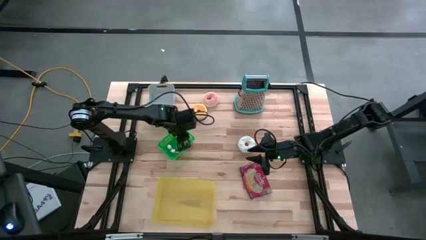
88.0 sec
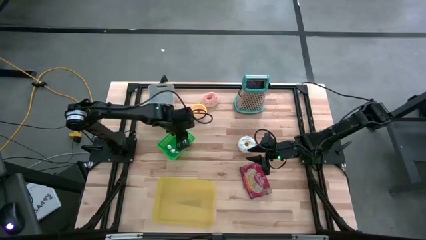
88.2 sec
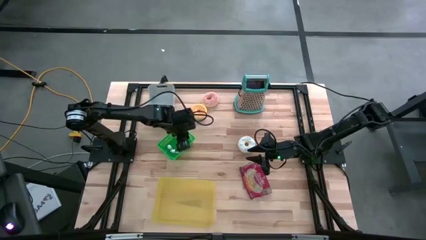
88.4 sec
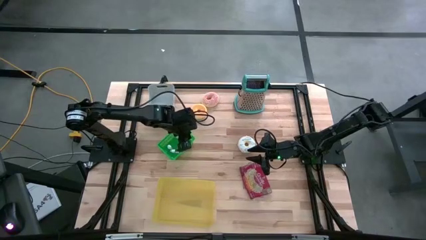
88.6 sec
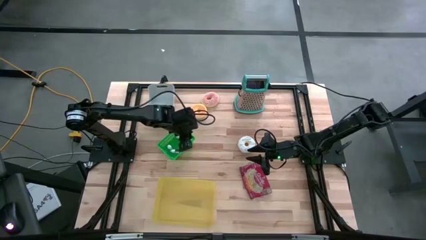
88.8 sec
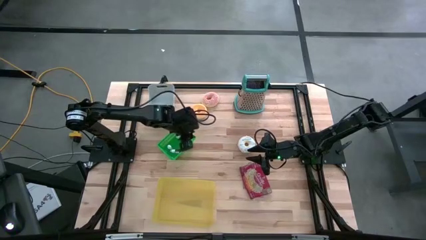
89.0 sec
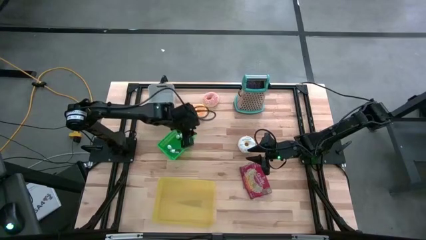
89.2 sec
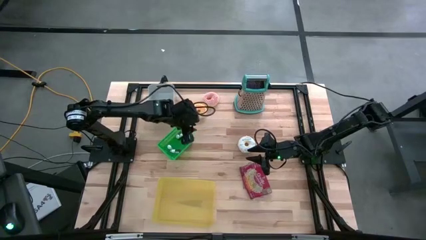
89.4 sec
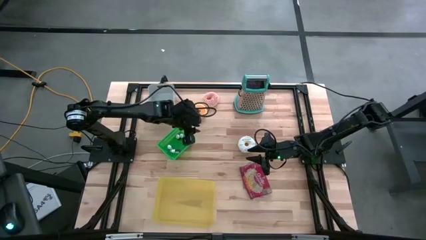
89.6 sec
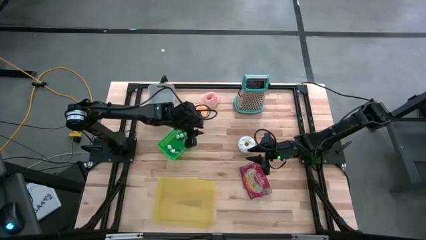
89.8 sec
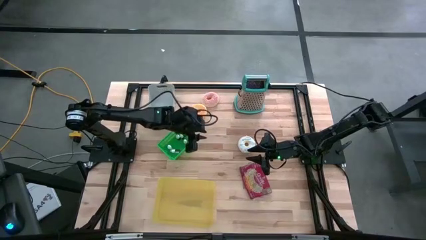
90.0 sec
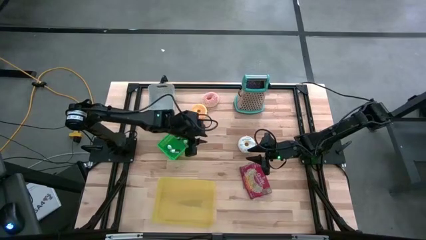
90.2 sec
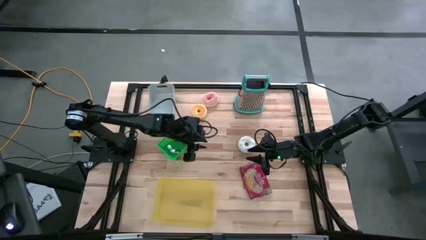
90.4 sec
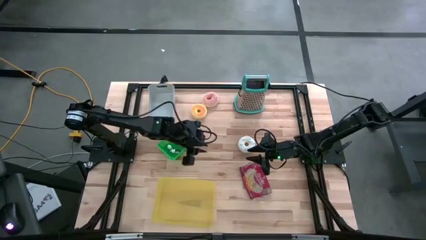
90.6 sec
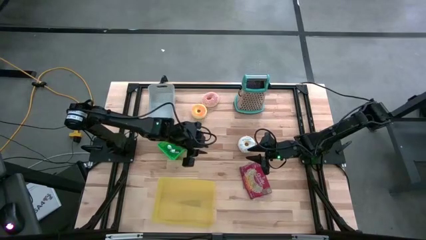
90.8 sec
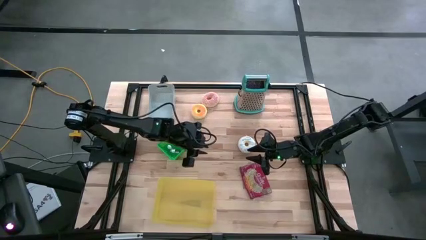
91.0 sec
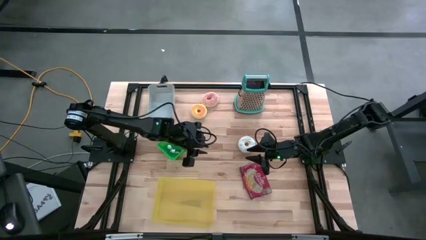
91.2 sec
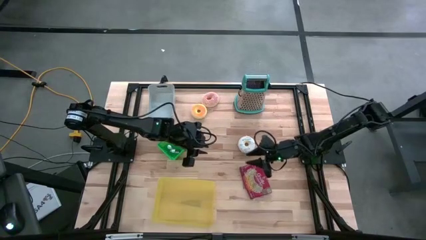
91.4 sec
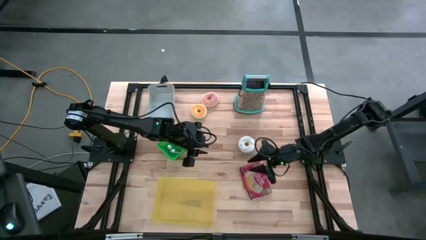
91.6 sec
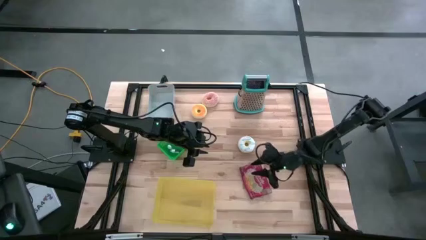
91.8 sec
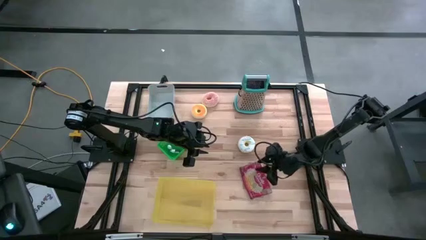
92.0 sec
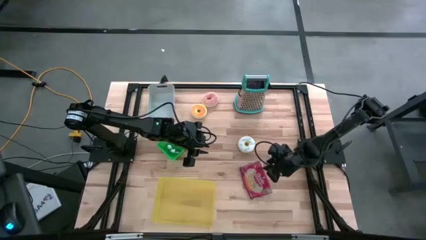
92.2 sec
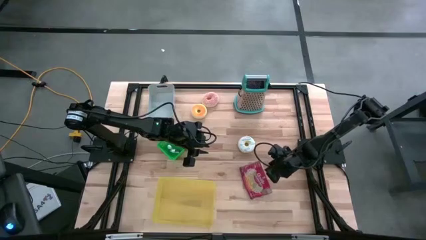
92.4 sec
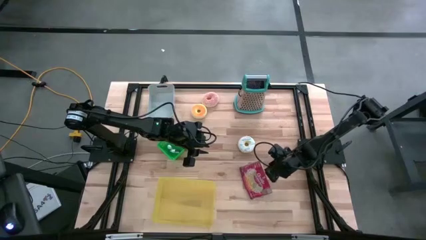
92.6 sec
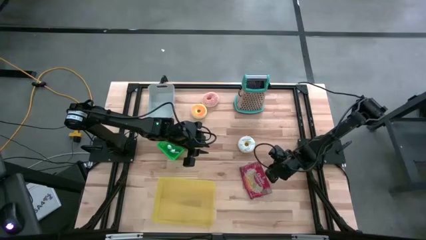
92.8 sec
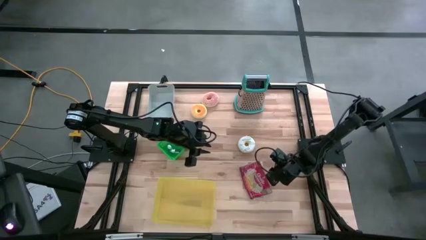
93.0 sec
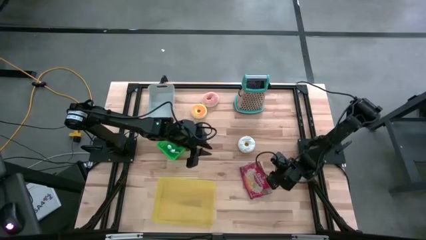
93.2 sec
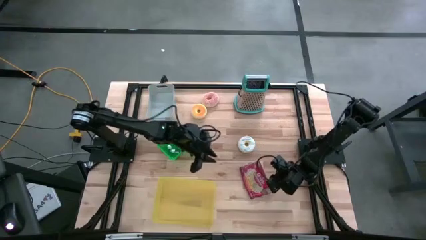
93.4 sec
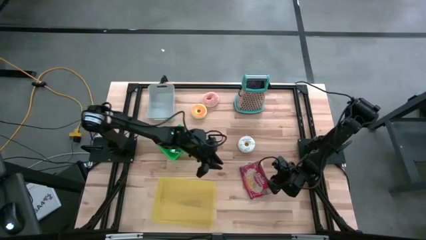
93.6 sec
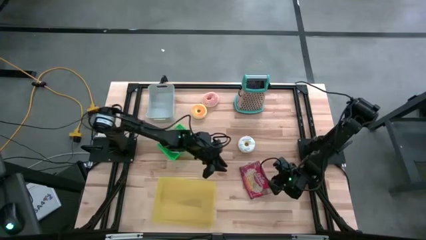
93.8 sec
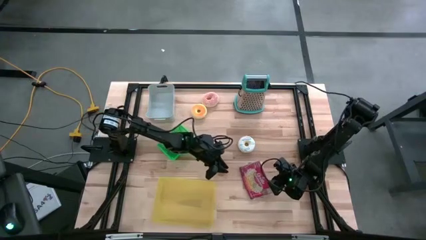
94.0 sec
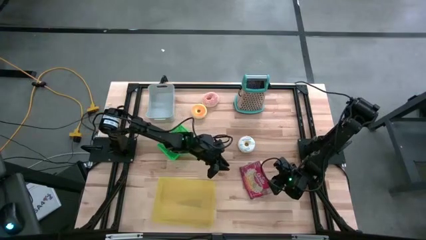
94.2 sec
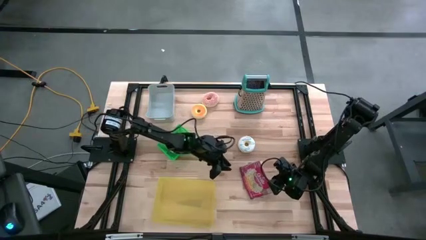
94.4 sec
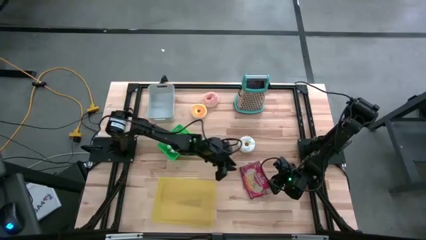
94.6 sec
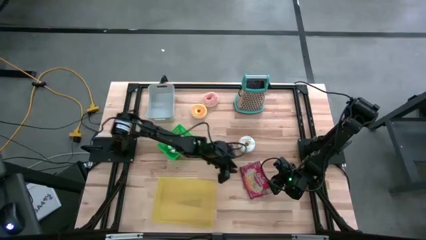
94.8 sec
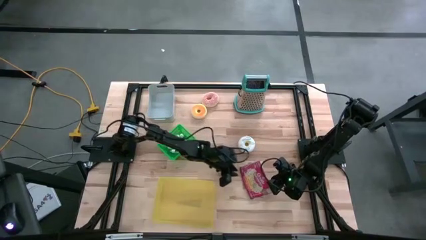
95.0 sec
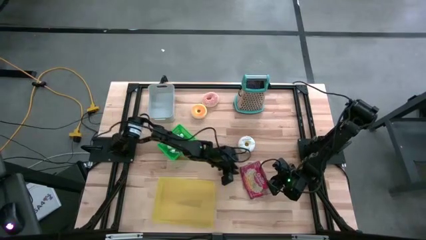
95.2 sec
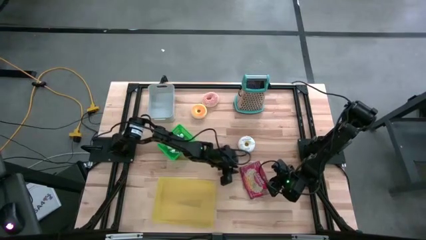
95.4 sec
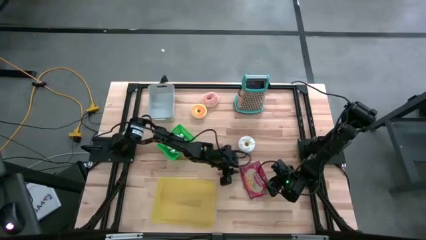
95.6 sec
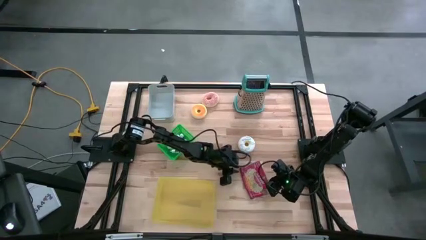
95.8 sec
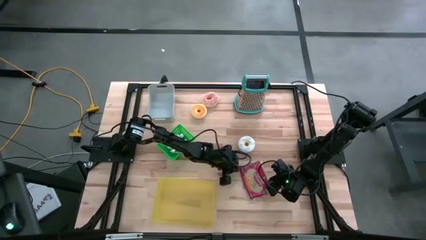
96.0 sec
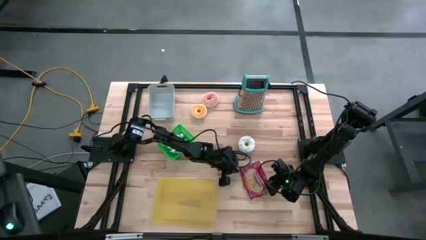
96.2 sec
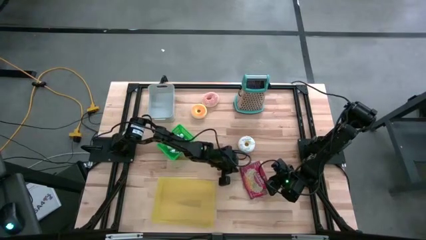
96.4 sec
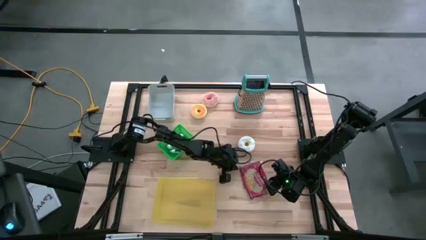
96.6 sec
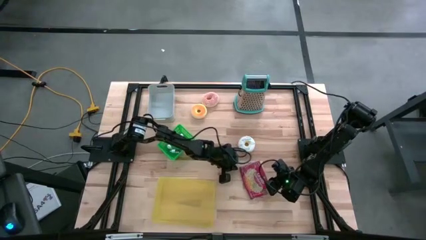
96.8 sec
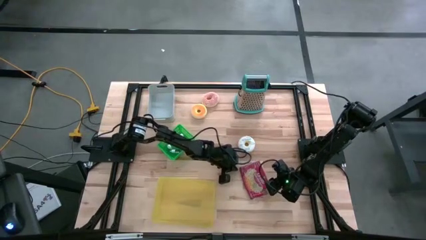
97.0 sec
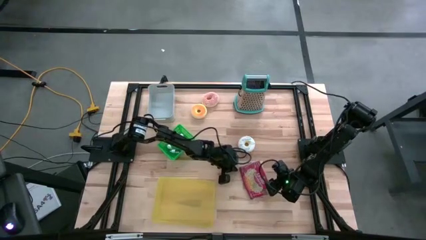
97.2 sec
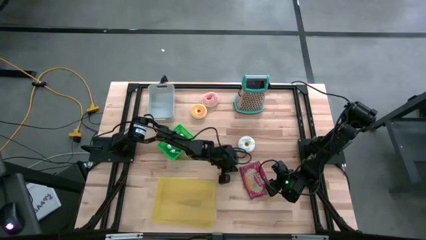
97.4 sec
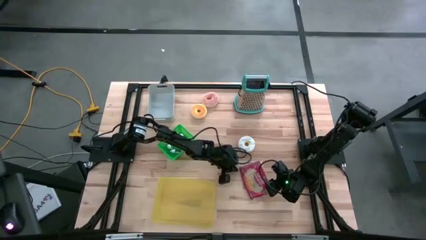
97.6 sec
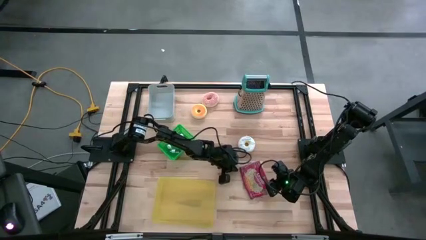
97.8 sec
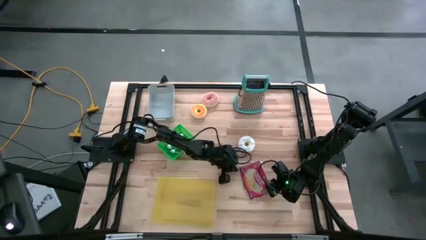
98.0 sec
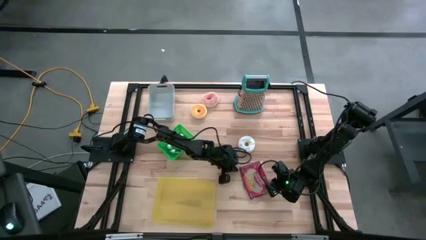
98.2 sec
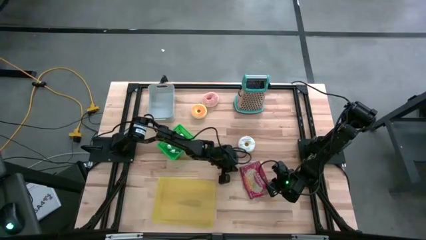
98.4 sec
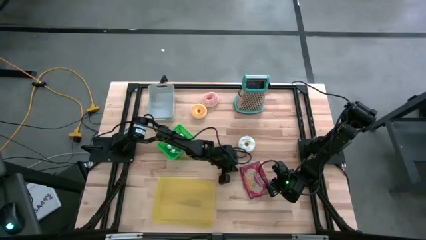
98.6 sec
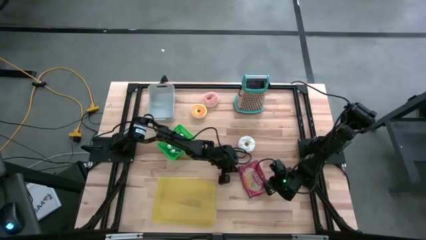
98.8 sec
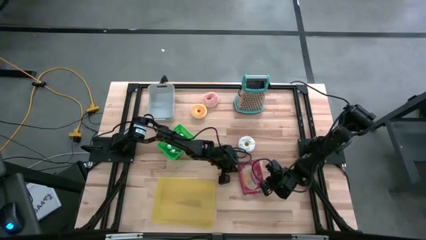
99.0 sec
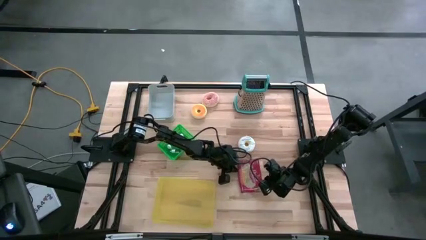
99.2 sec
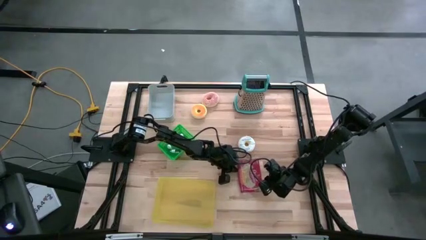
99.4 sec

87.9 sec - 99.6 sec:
Put the red bag into the yellow bin
